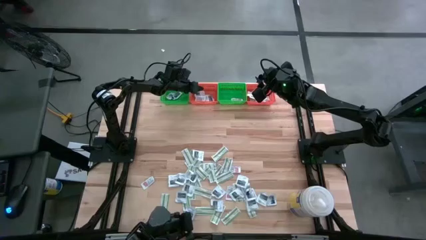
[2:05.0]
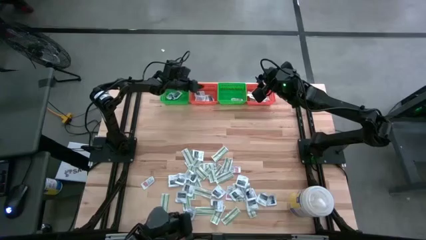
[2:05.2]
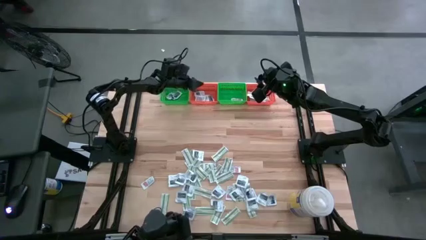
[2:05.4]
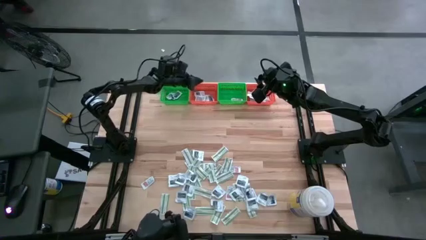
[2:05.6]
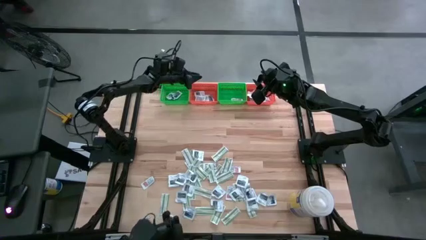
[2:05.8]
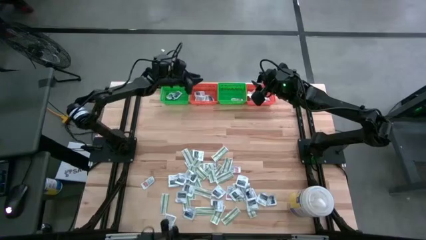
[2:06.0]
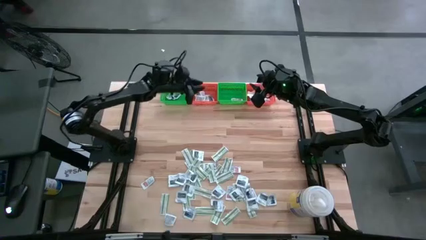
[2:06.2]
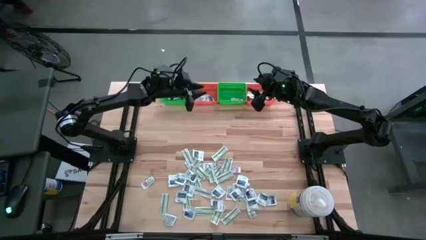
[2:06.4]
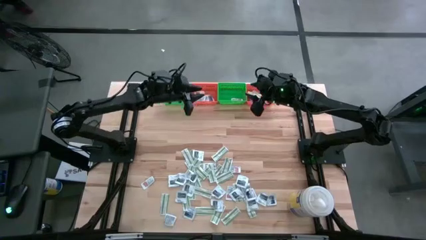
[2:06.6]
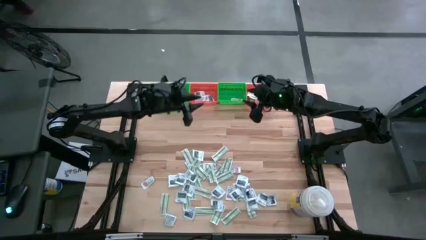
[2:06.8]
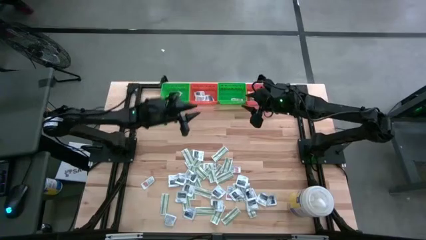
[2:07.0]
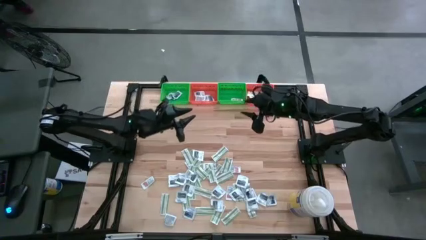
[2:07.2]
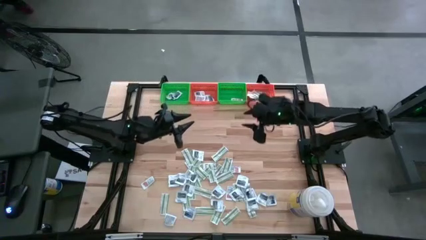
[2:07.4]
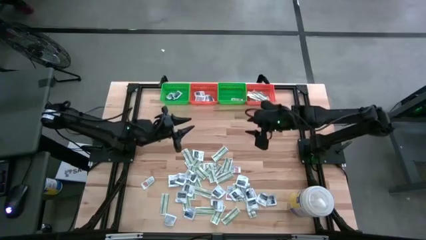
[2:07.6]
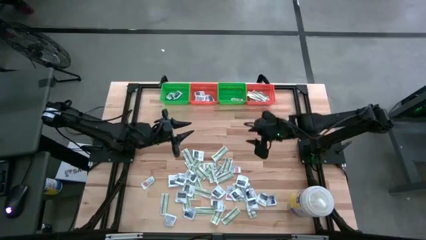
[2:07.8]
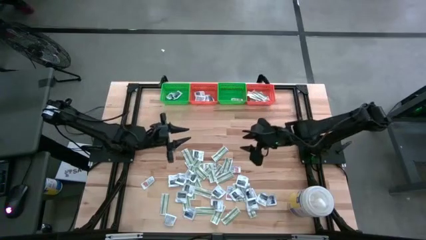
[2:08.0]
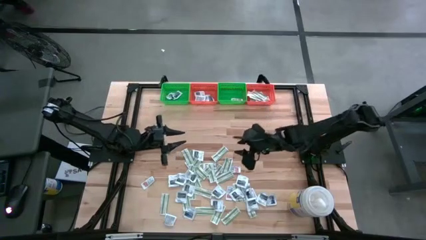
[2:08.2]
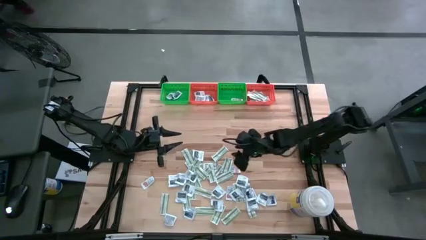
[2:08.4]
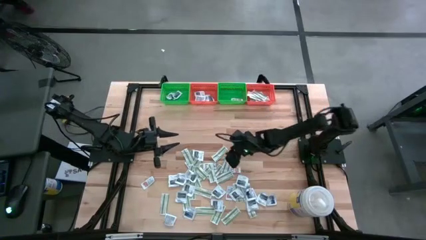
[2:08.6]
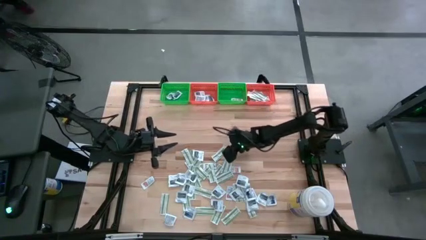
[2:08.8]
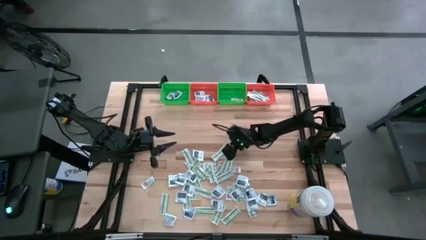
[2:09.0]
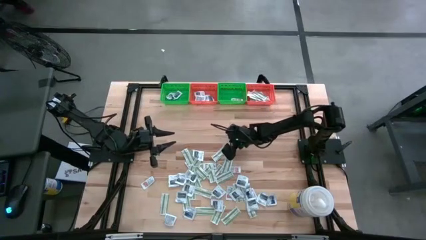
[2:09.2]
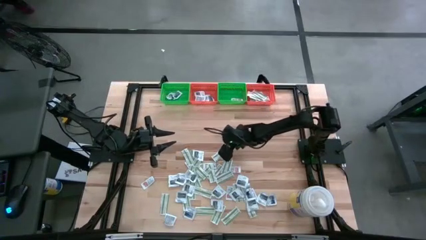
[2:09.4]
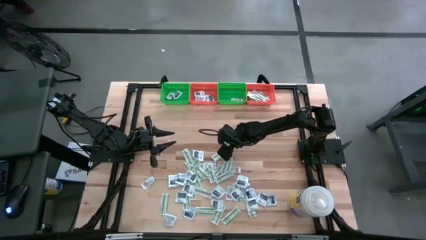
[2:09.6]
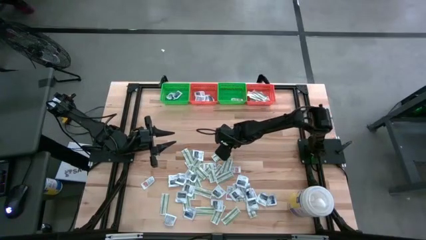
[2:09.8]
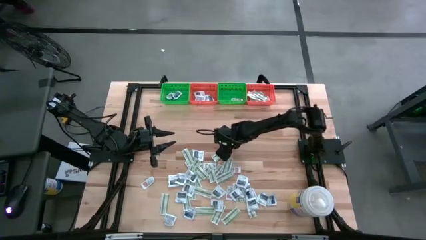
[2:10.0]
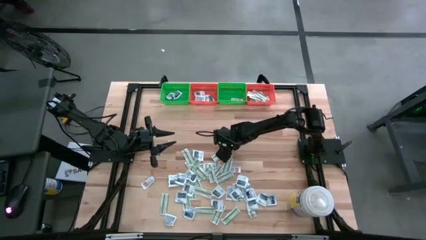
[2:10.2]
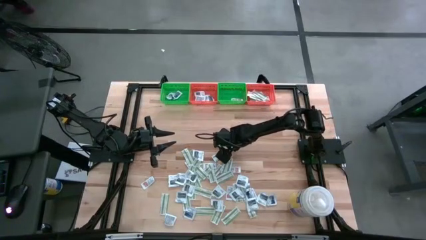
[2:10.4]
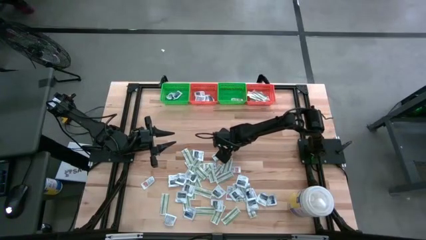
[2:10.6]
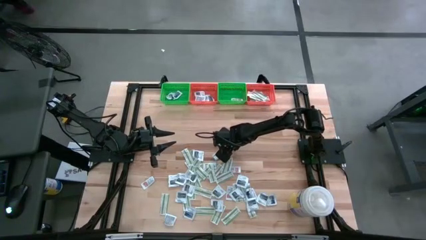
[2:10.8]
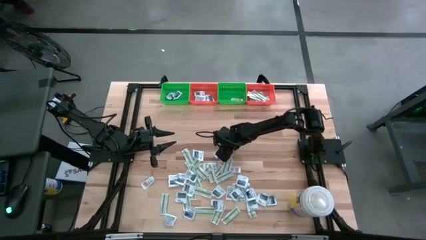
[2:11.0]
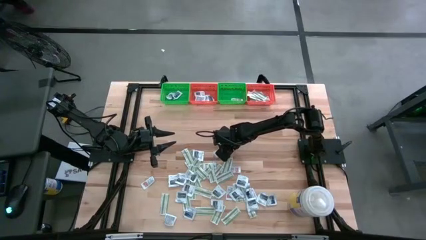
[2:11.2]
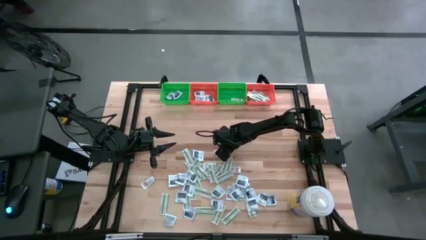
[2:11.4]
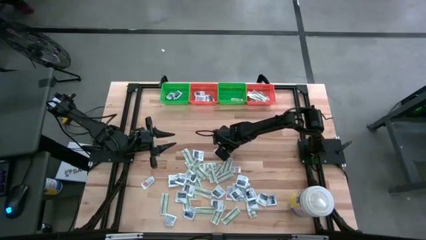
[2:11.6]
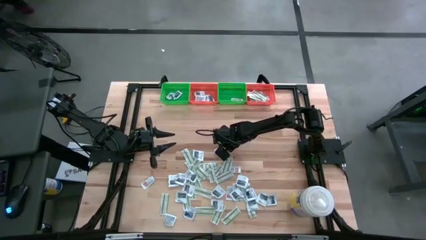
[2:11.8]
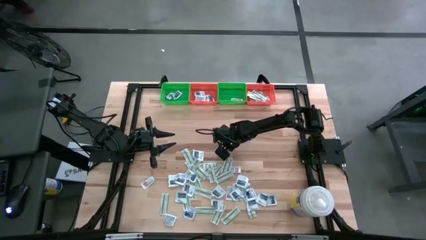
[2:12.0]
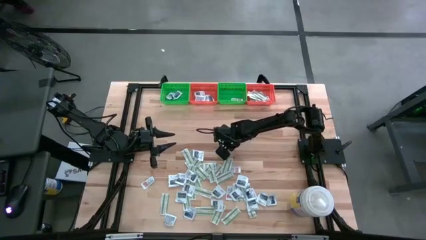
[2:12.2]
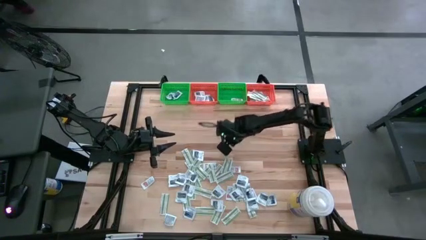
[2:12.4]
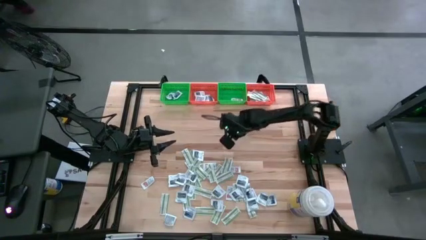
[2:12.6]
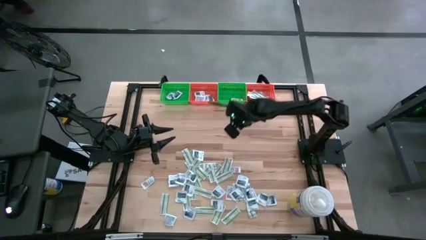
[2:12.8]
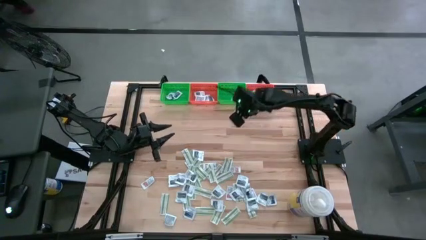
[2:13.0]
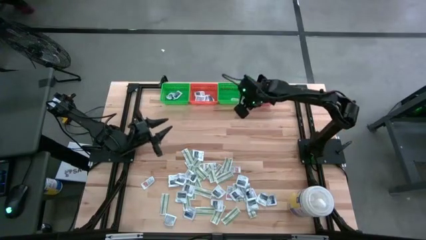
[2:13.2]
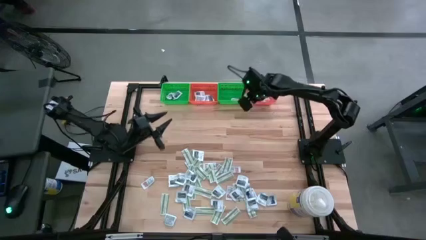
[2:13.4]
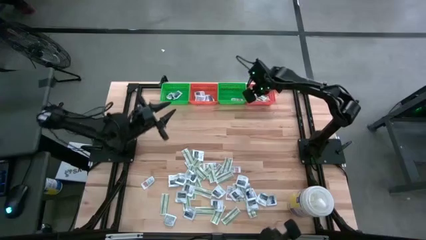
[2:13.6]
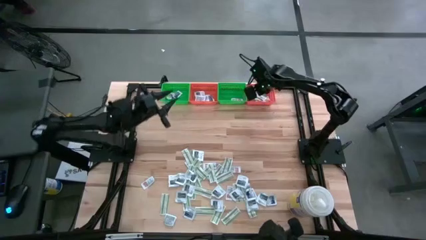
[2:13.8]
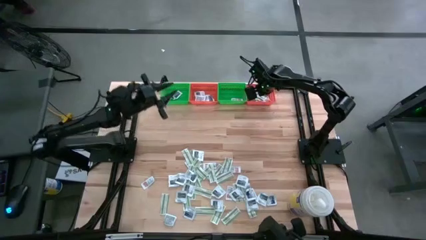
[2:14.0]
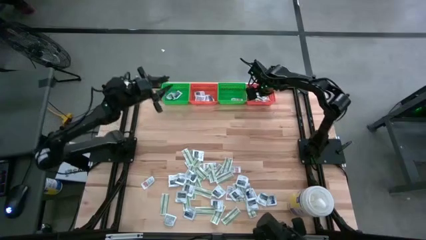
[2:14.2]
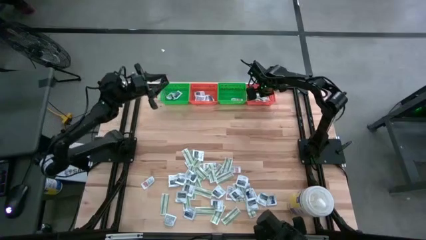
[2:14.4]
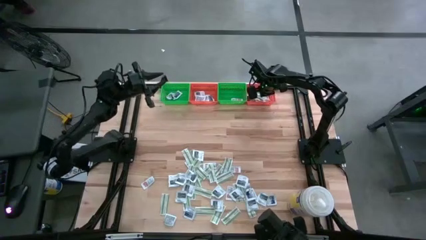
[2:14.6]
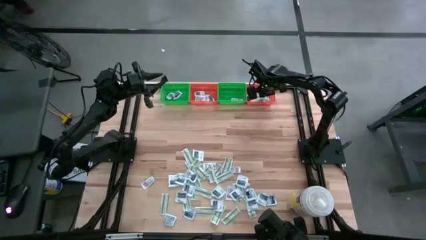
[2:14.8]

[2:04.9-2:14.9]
Task: Pick & Place First Aid Supplies
Put the green bandage pack in the right orange bin

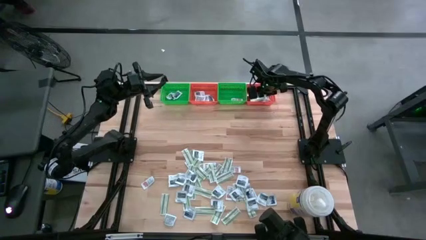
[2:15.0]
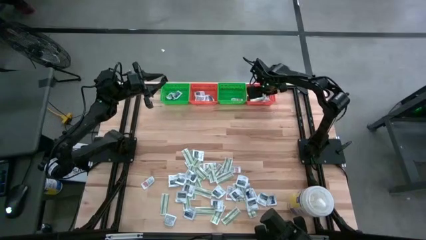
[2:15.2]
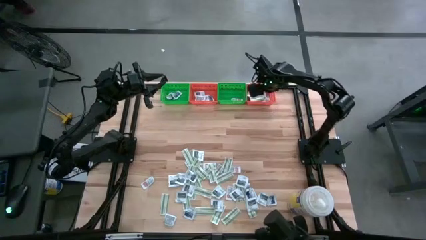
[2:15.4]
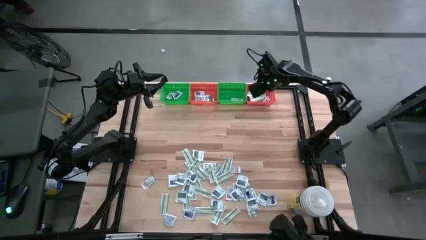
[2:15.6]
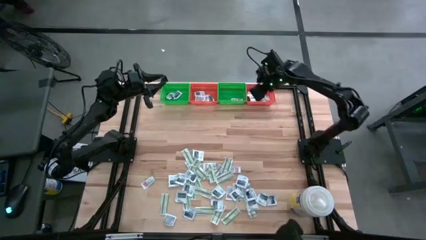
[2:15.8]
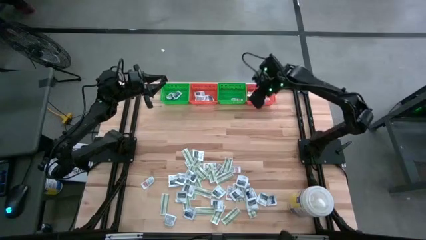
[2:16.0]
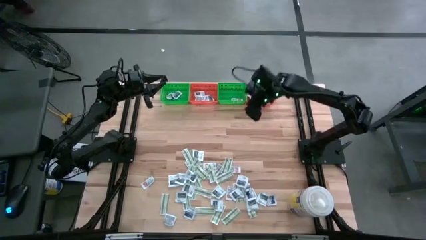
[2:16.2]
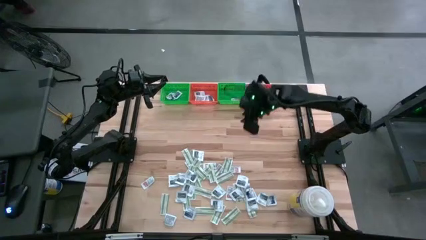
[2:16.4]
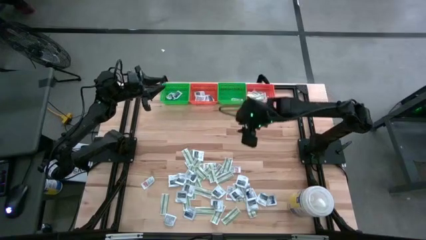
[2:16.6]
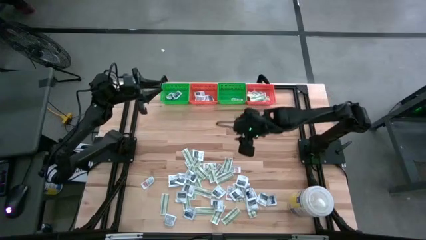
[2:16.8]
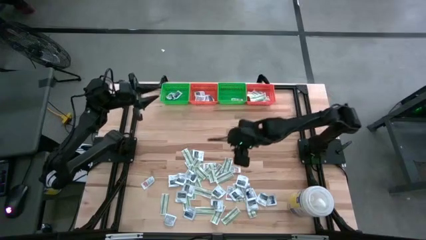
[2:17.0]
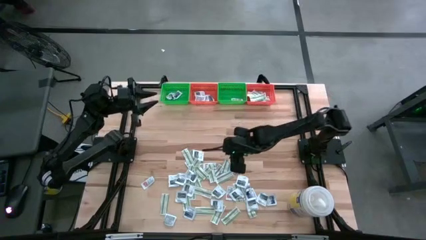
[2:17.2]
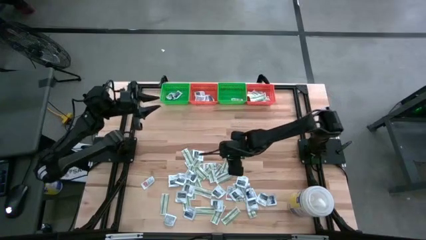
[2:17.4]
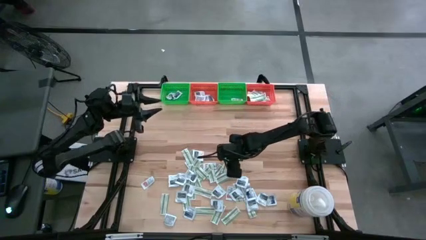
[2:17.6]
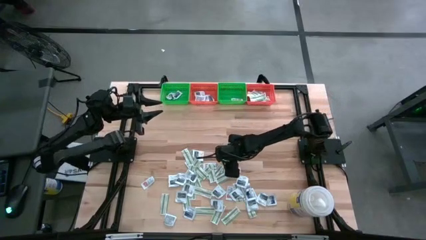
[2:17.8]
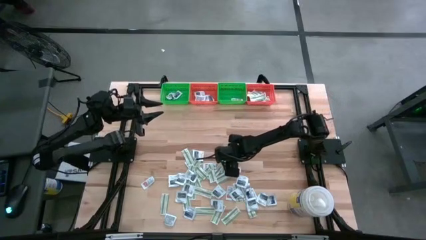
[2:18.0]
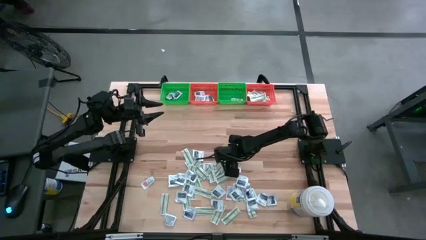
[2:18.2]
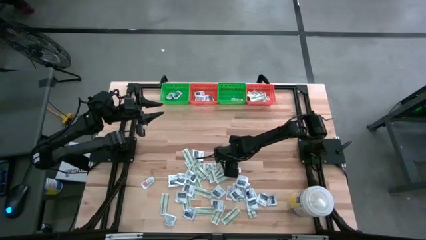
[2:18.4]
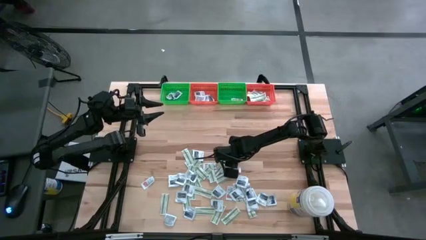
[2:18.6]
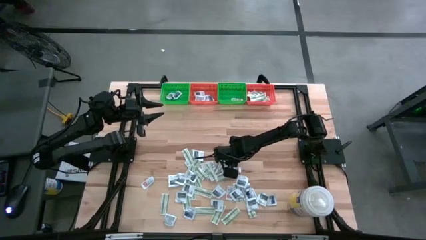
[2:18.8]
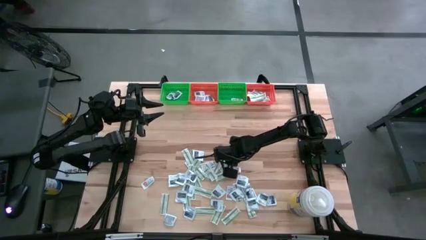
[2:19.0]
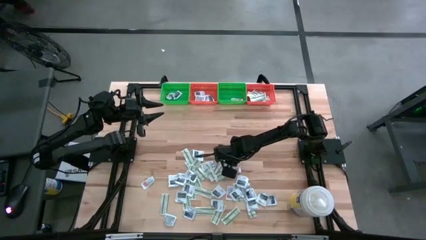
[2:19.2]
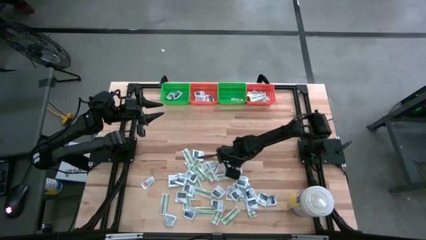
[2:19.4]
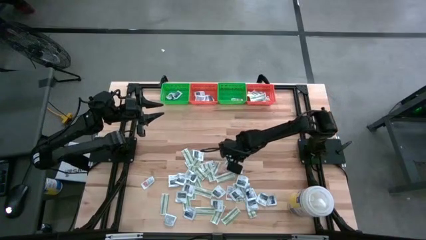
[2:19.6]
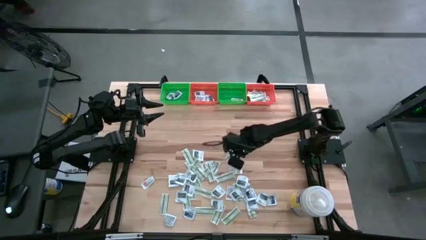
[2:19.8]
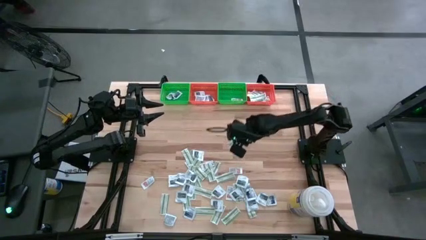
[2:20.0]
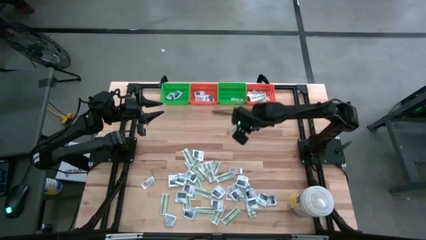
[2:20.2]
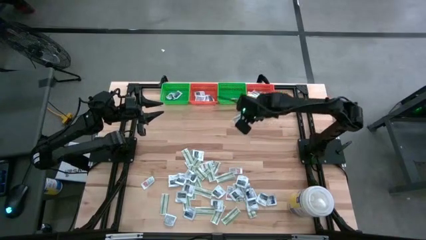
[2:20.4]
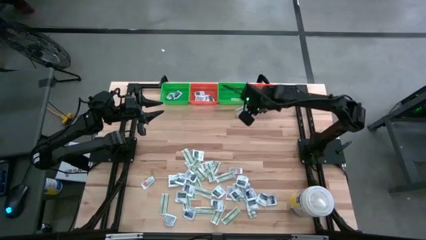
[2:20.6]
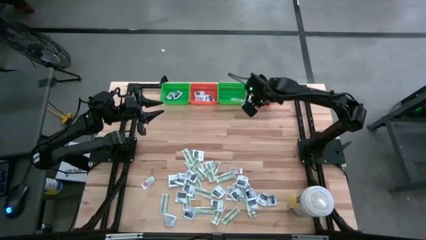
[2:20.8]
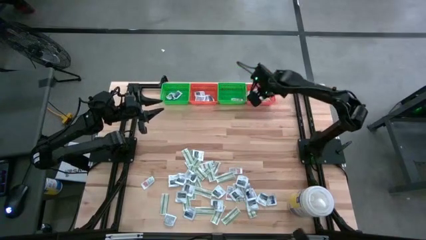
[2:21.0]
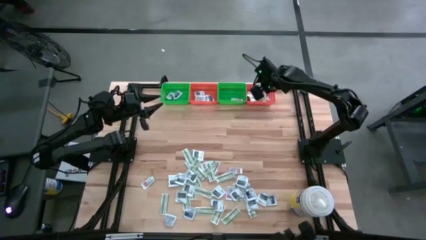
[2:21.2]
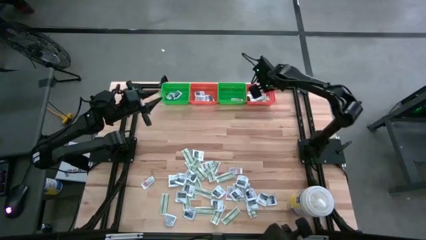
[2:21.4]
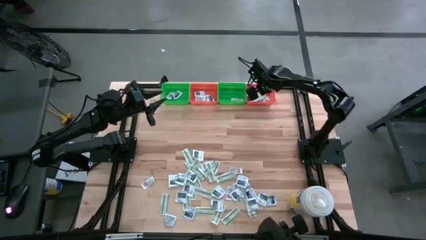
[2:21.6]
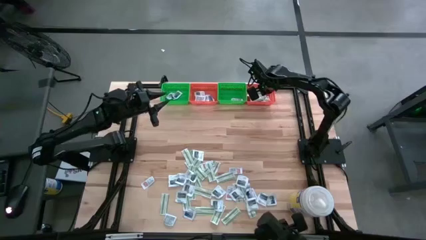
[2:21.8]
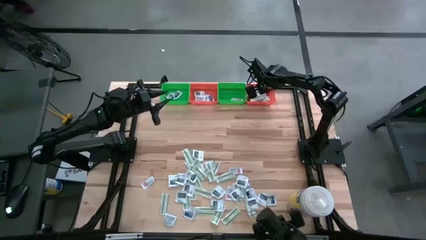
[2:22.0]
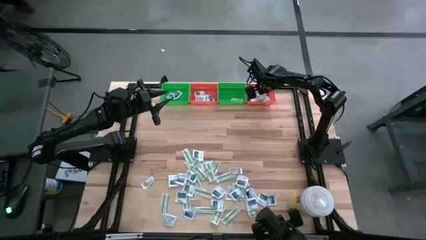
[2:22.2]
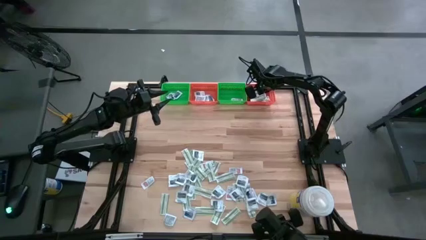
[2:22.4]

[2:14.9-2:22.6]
Put the green bandage pack in the right orange bin
